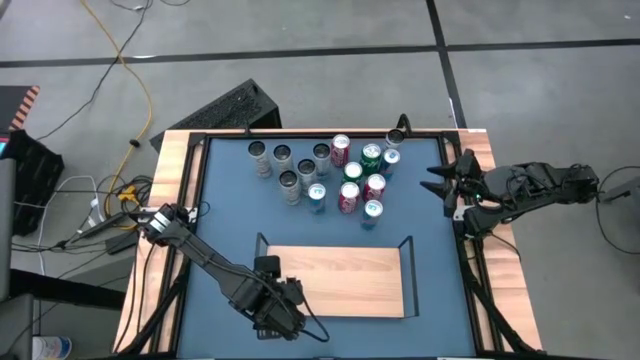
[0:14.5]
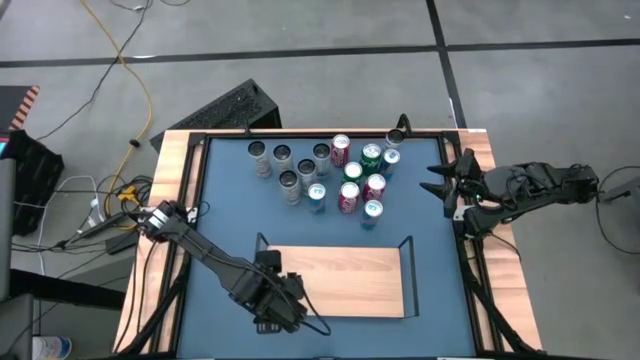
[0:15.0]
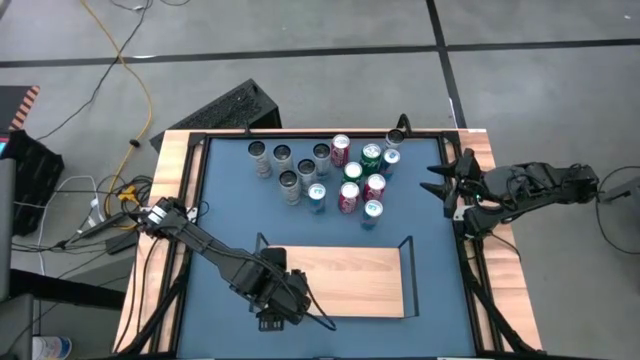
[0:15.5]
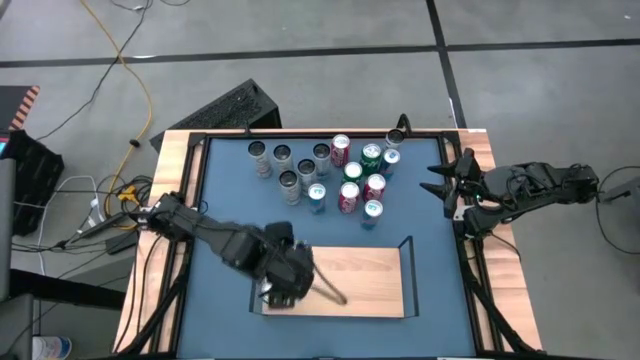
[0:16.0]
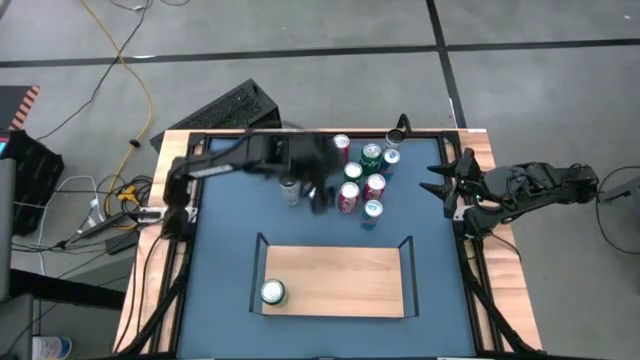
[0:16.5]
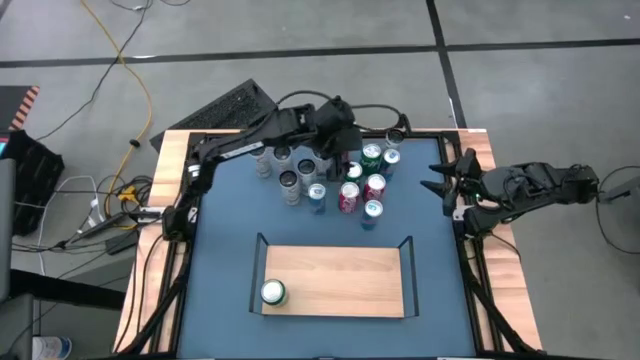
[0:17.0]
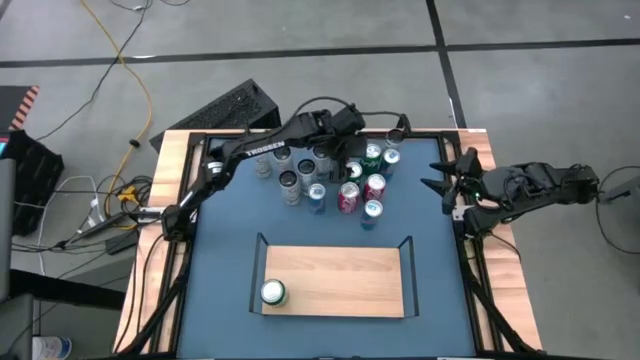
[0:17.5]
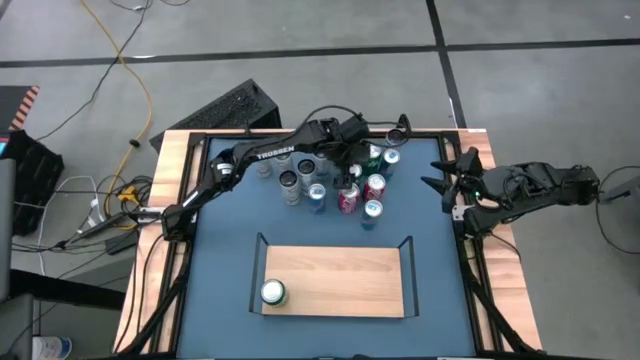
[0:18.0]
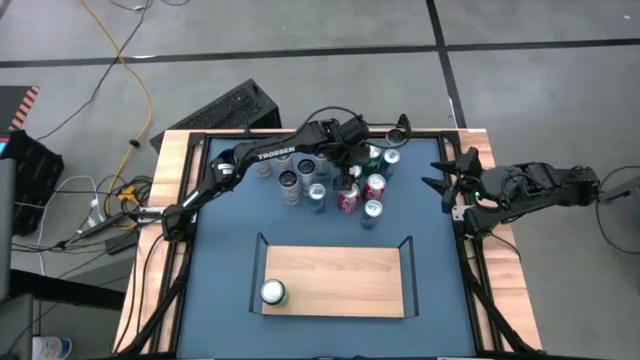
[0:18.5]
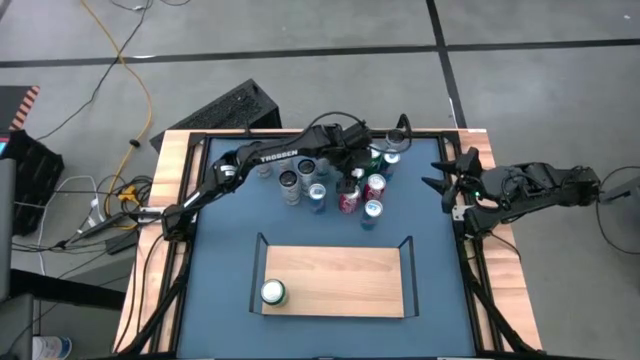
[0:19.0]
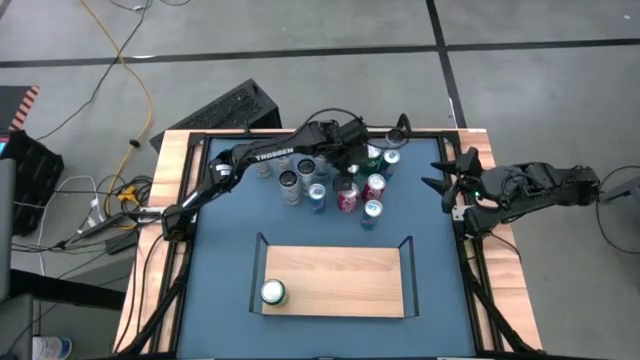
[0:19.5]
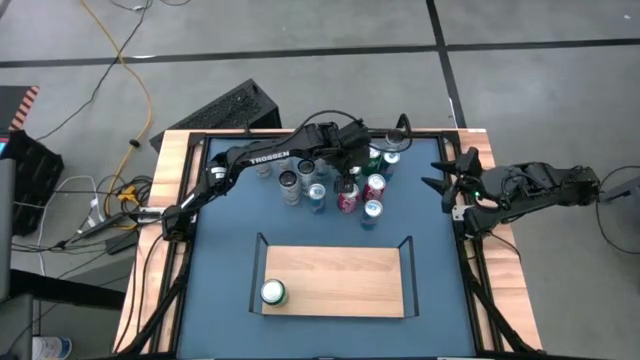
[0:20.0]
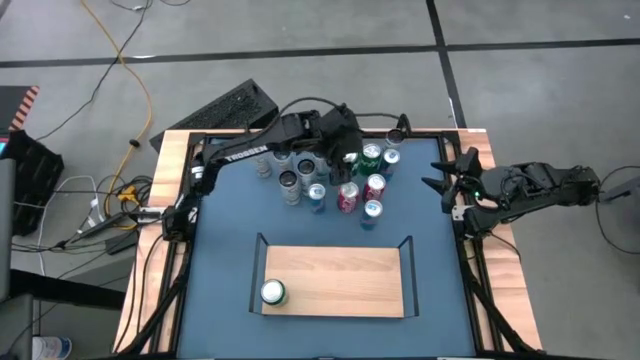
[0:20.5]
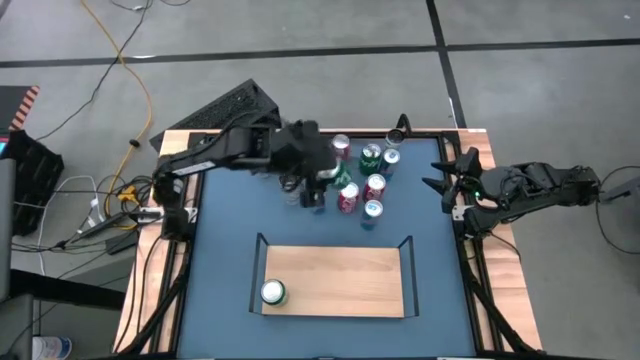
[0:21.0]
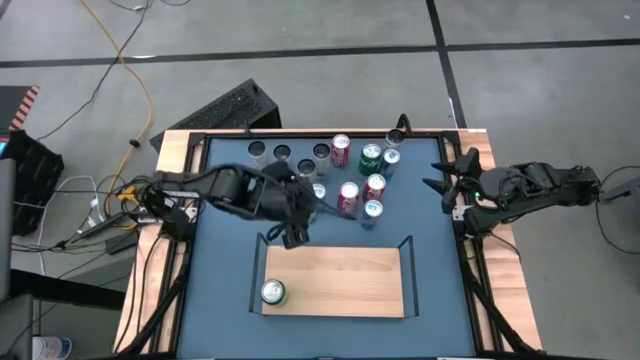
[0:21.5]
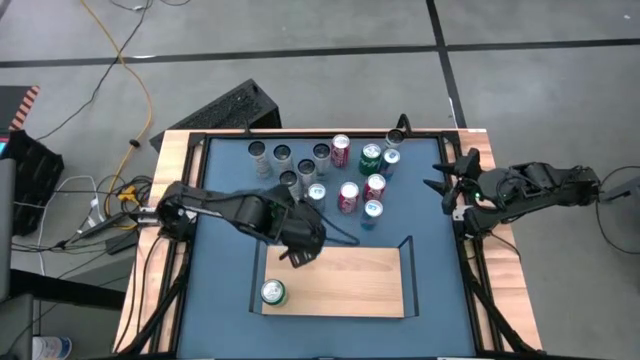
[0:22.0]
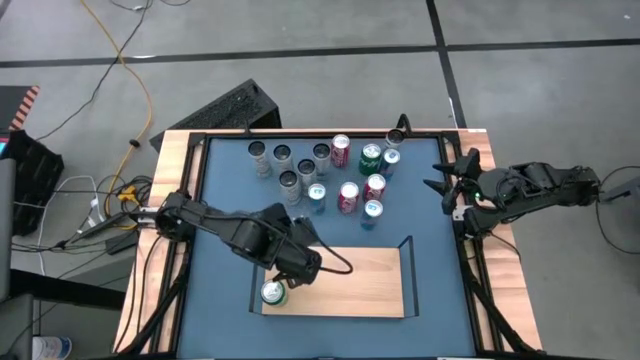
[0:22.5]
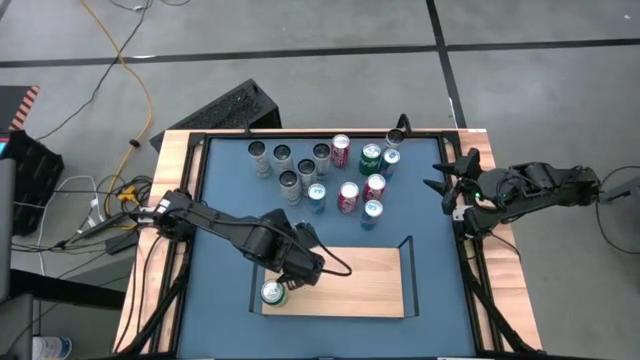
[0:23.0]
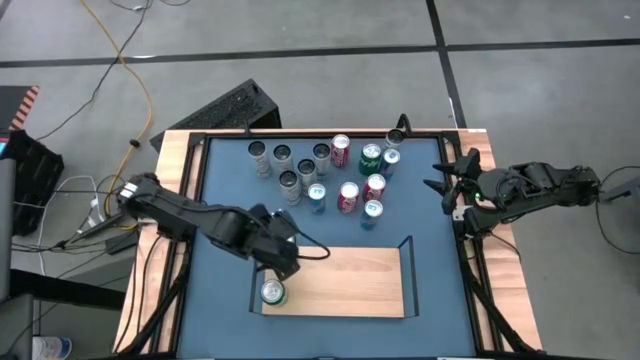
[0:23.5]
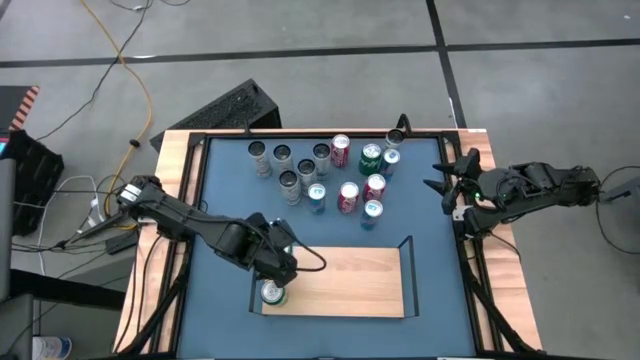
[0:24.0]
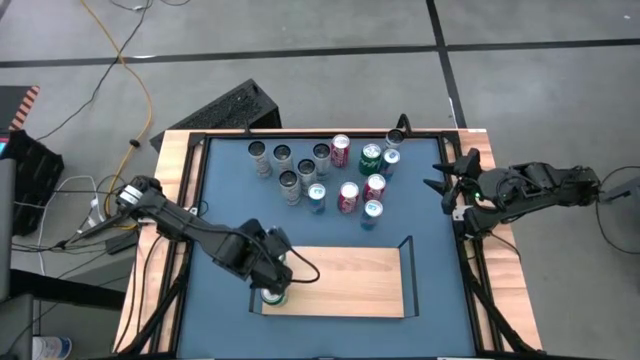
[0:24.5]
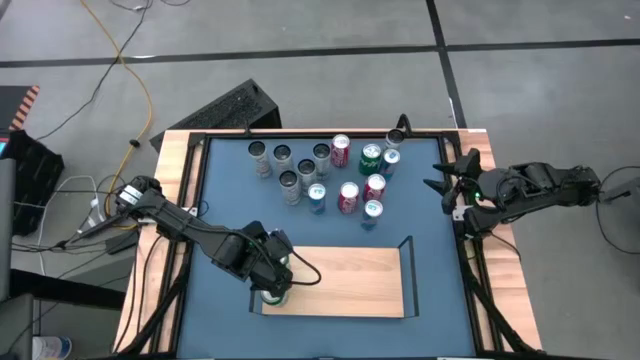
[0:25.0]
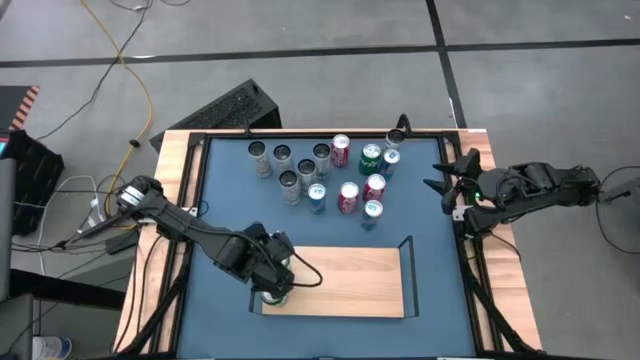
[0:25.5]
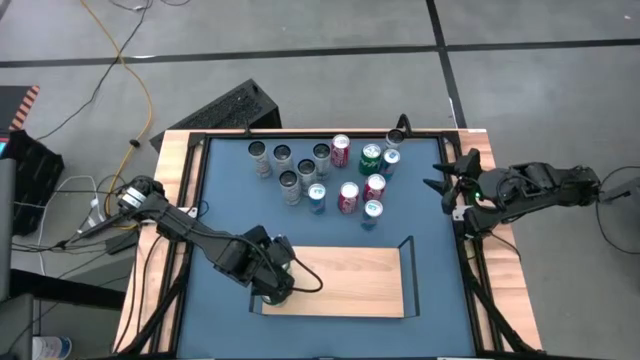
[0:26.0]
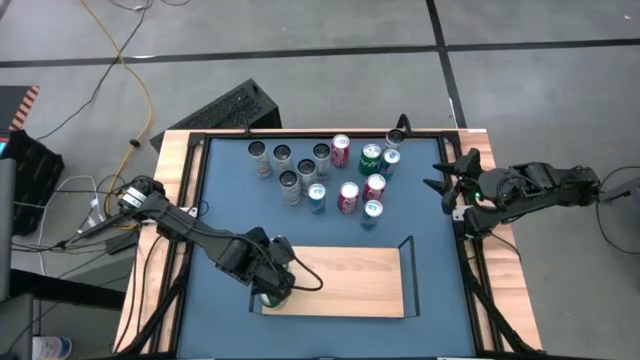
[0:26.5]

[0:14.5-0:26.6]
Task: Place canned beverage on shelf
Put the bottom green soda can on the shelf aligned with the other green soda can

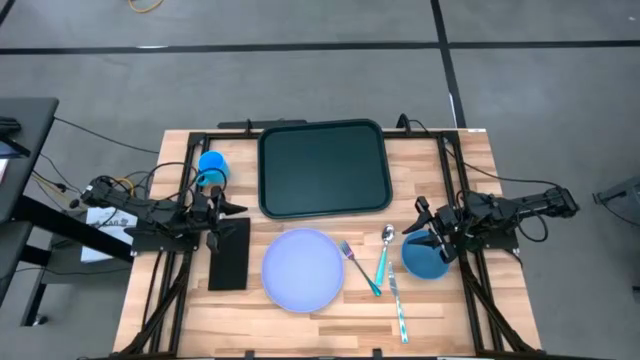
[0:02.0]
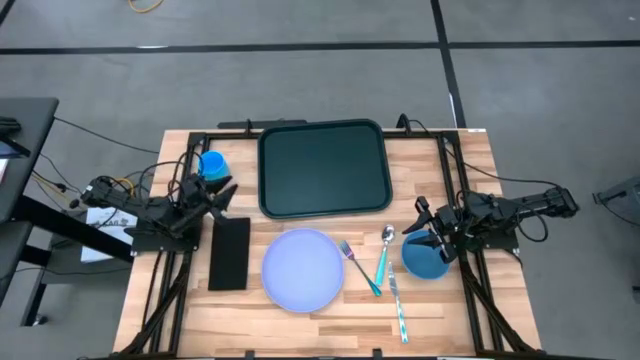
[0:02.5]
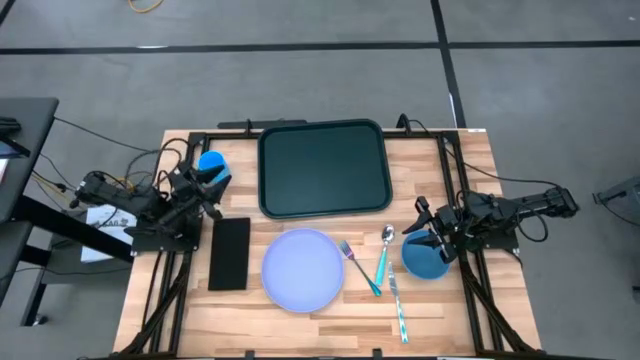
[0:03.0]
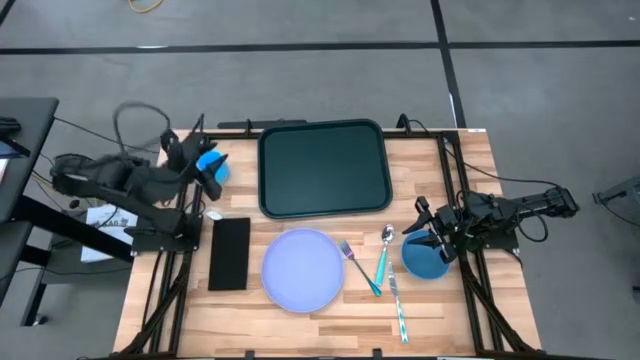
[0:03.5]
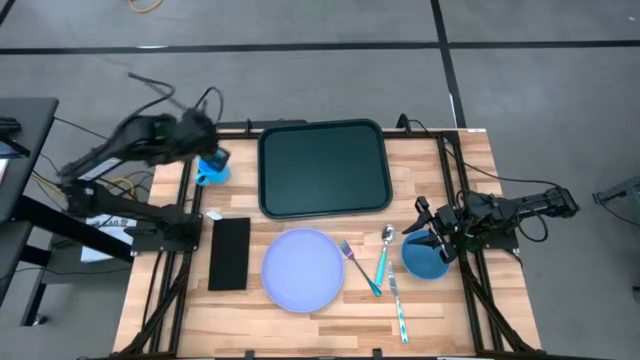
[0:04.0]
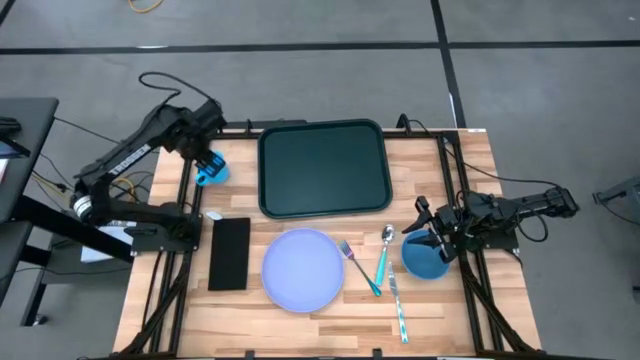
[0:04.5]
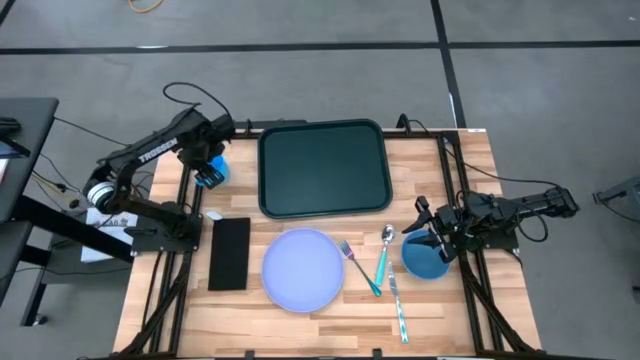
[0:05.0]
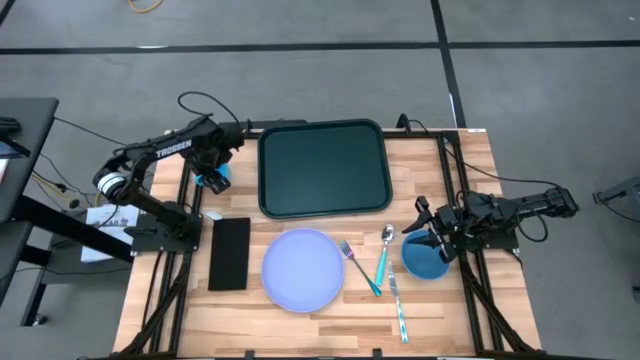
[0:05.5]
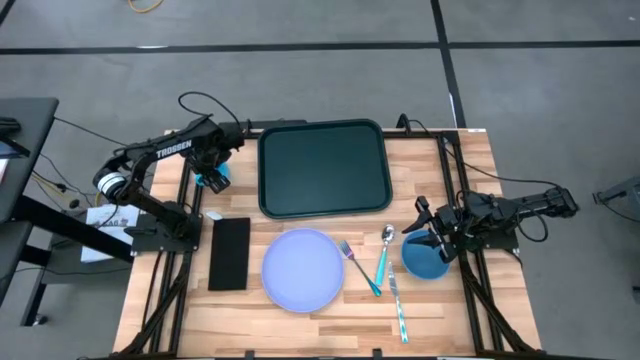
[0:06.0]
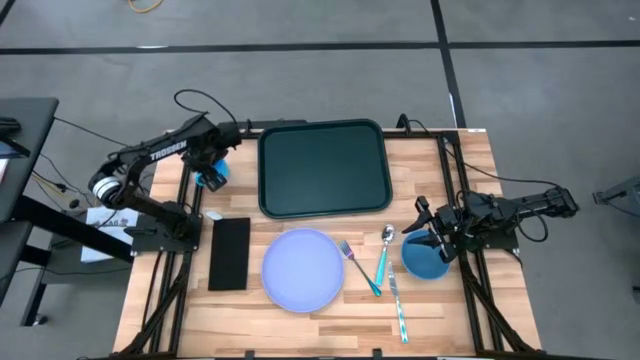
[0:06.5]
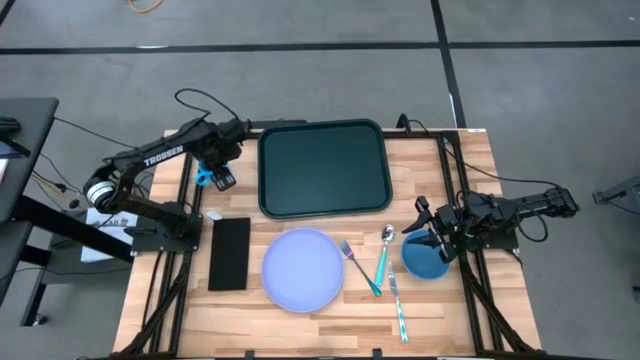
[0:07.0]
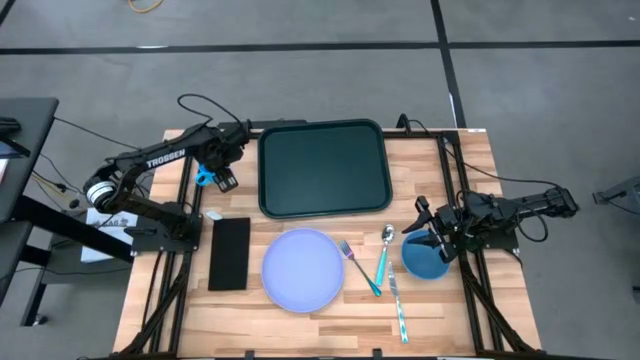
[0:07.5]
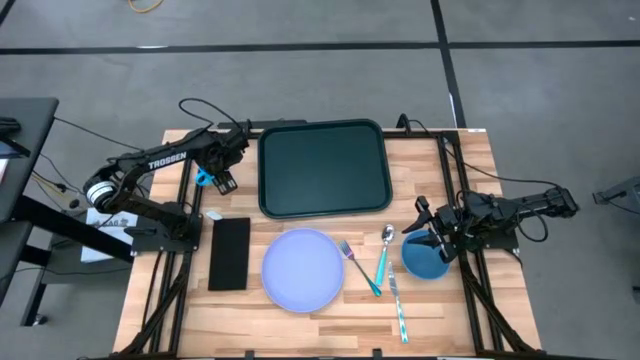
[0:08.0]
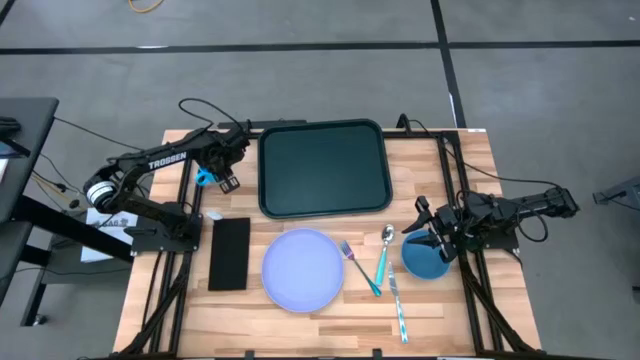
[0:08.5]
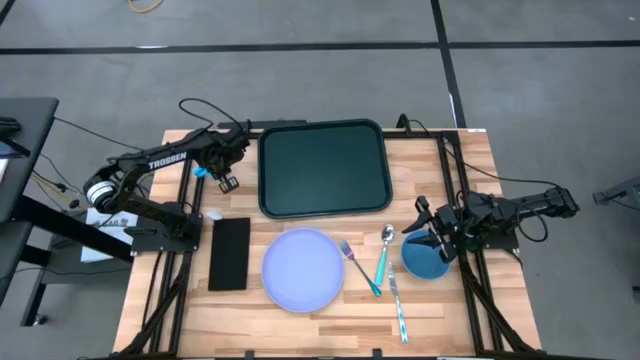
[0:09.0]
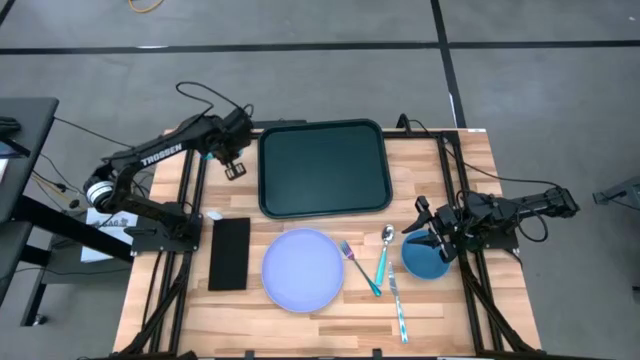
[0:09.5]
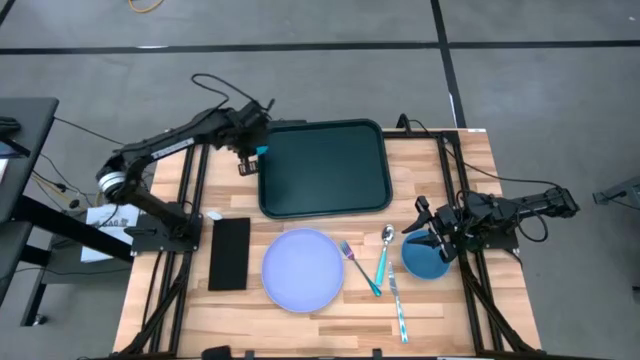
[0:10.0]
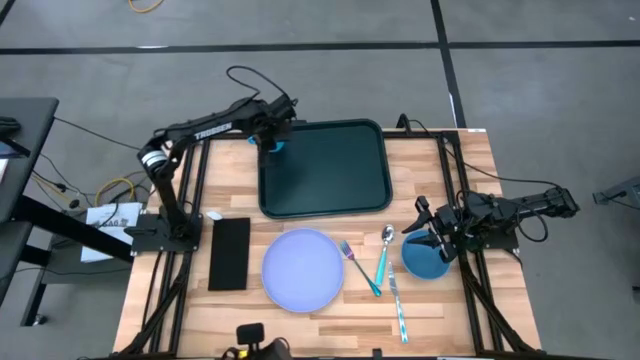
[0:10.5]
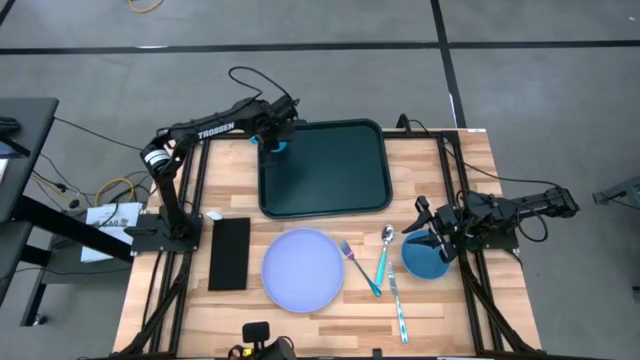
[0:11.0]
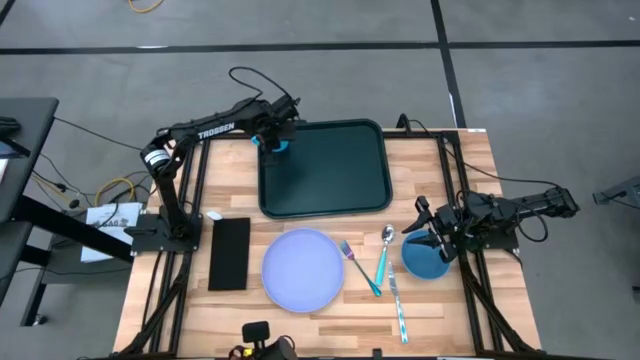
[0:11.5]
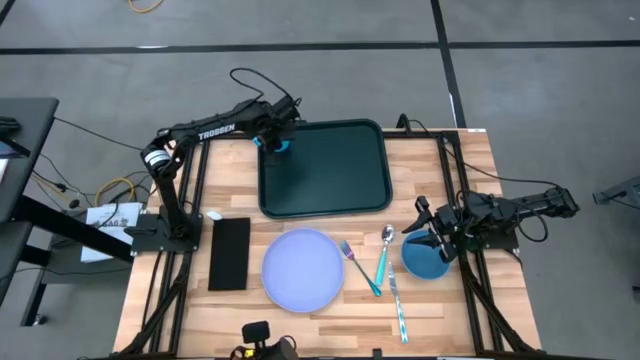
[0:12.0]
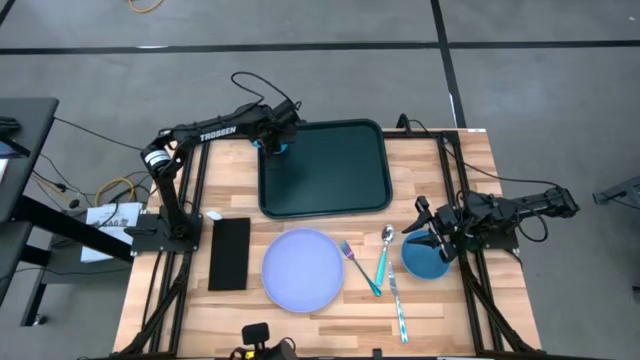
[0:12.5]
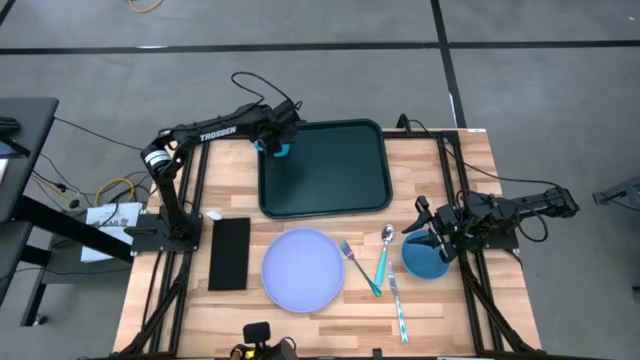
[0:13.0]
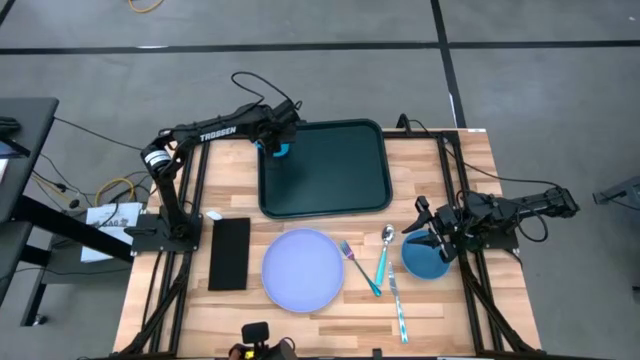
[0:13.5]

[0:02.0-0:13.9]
Task: Set up tray
Put the blue mug on the black tray
